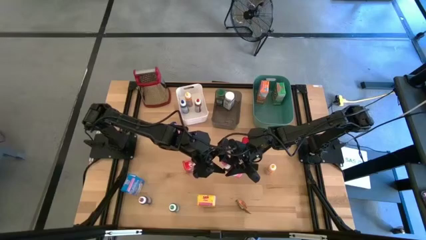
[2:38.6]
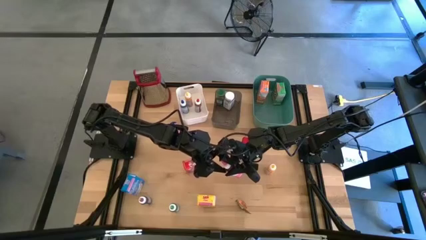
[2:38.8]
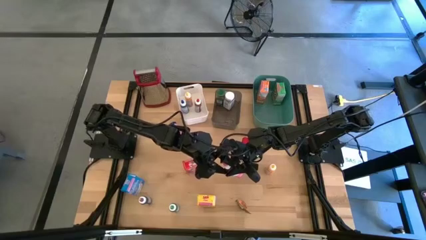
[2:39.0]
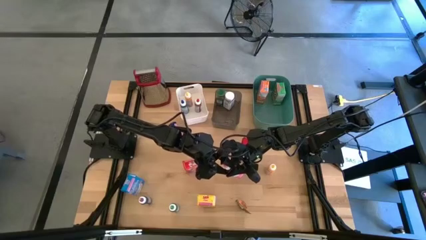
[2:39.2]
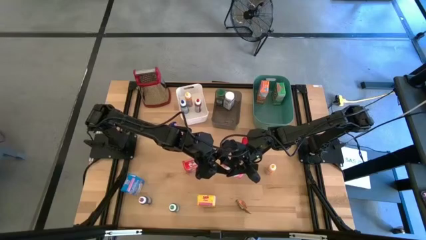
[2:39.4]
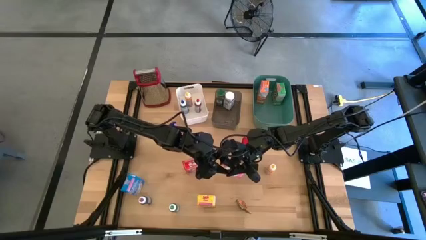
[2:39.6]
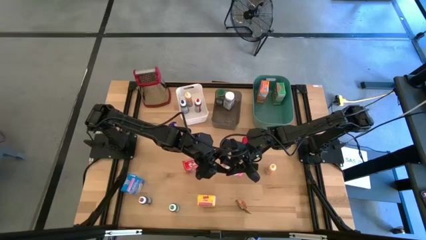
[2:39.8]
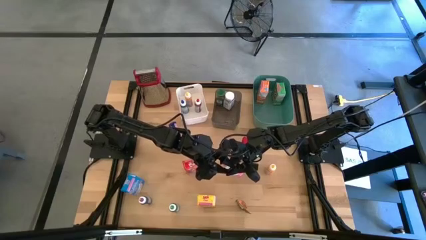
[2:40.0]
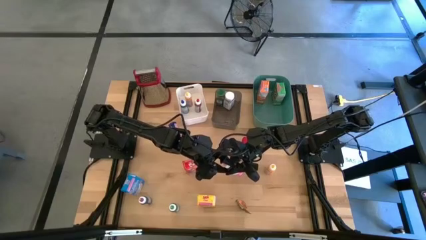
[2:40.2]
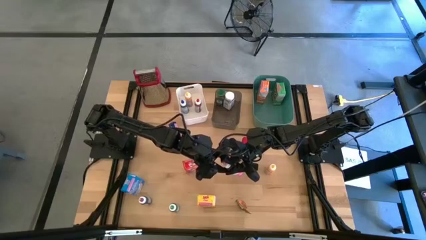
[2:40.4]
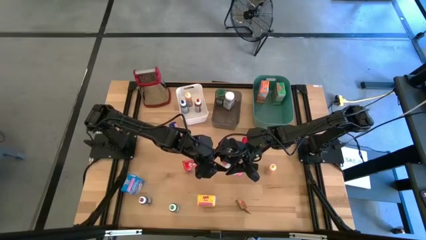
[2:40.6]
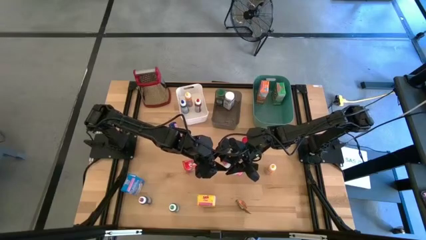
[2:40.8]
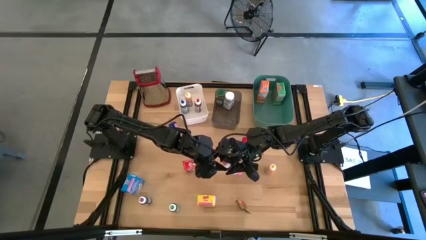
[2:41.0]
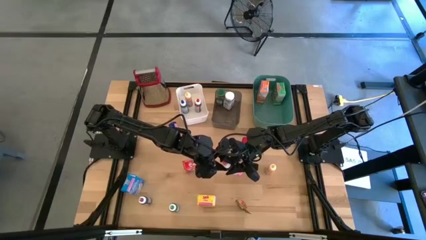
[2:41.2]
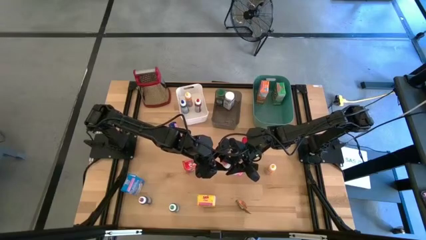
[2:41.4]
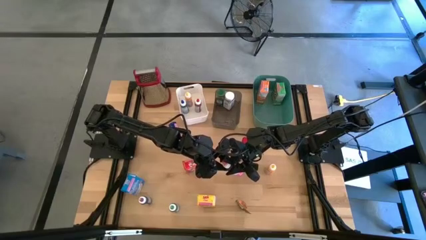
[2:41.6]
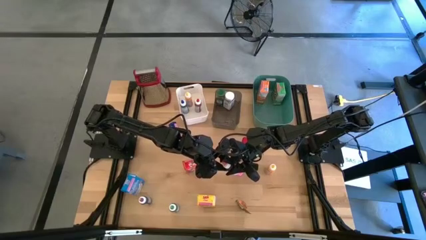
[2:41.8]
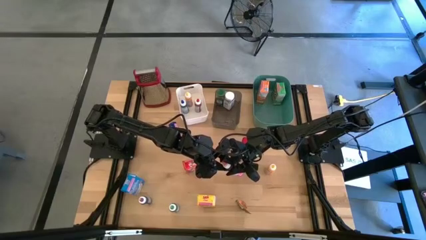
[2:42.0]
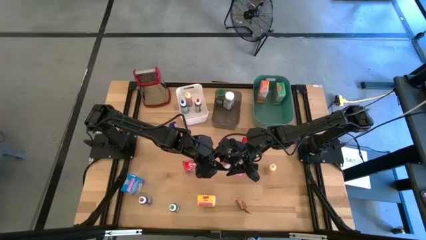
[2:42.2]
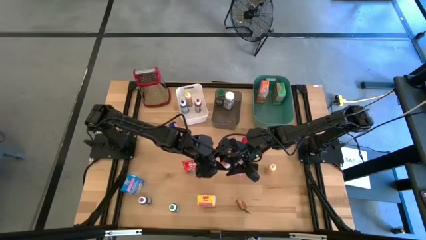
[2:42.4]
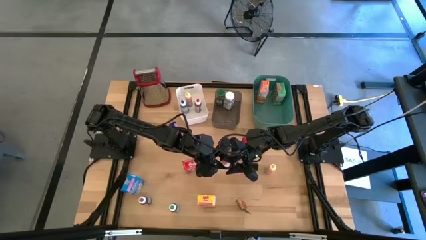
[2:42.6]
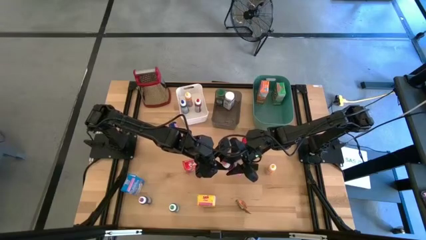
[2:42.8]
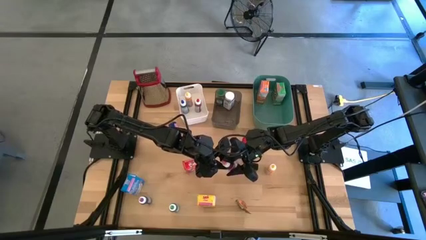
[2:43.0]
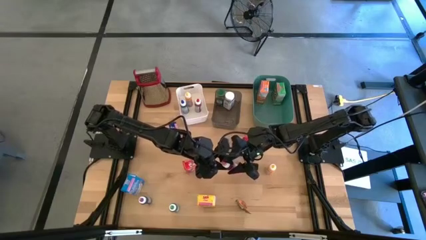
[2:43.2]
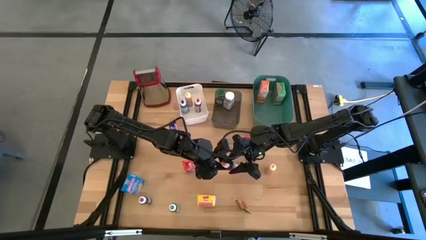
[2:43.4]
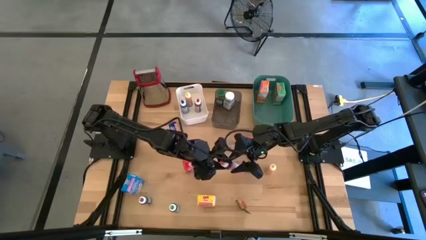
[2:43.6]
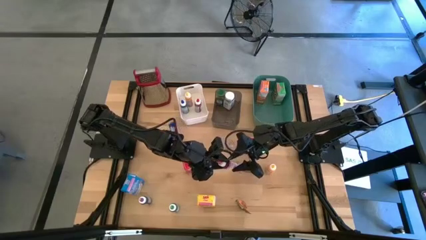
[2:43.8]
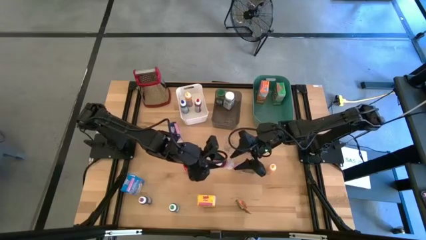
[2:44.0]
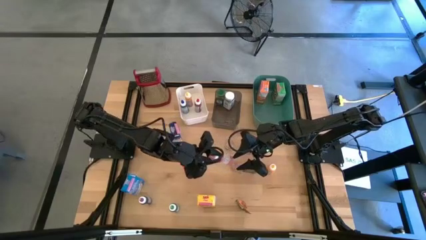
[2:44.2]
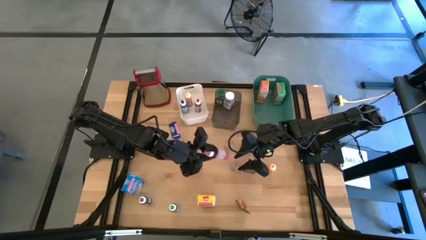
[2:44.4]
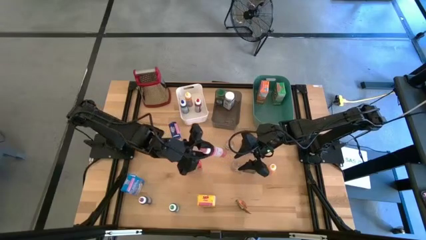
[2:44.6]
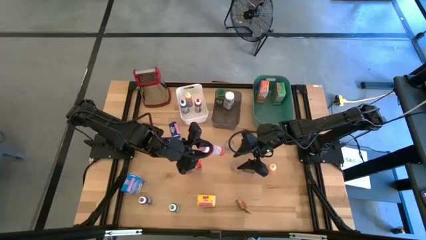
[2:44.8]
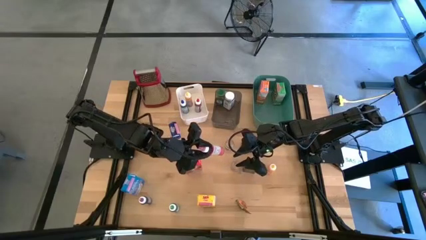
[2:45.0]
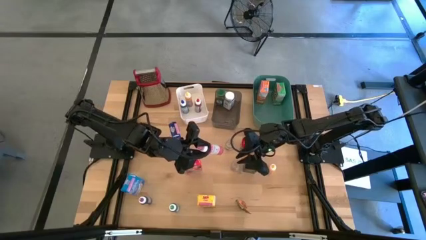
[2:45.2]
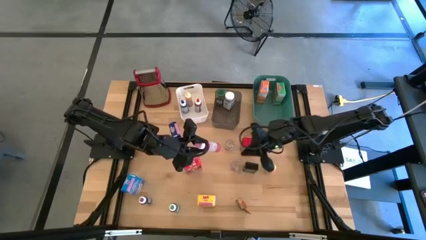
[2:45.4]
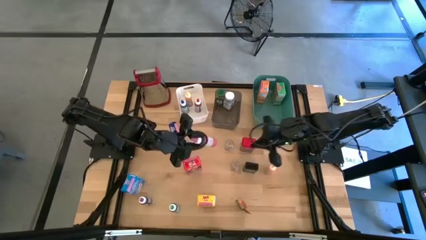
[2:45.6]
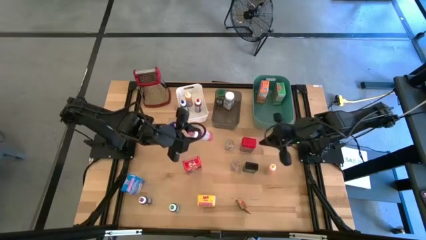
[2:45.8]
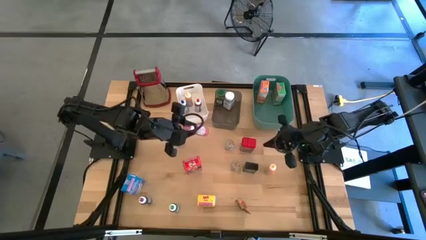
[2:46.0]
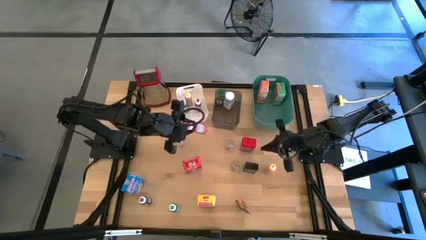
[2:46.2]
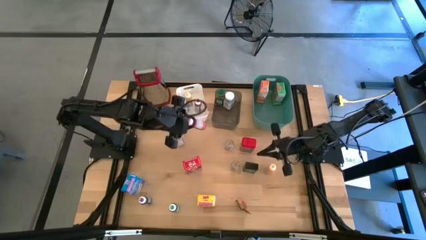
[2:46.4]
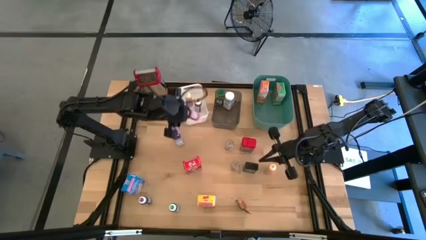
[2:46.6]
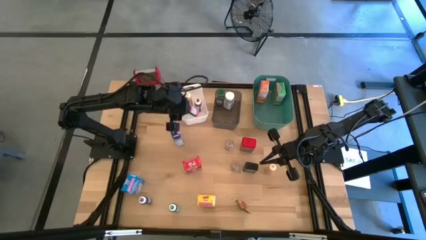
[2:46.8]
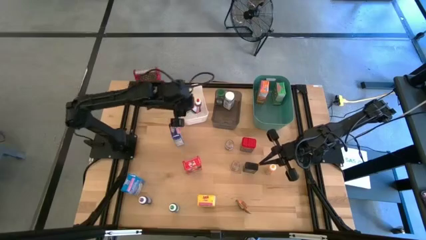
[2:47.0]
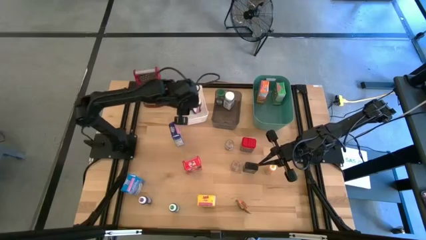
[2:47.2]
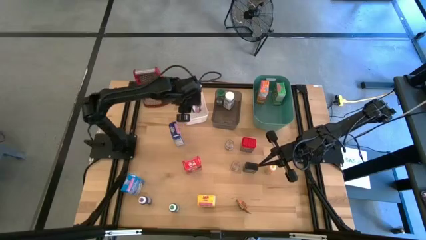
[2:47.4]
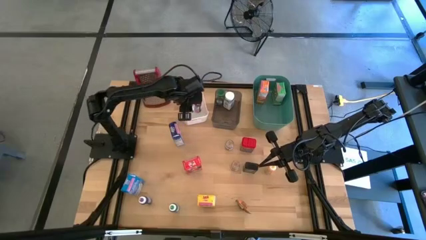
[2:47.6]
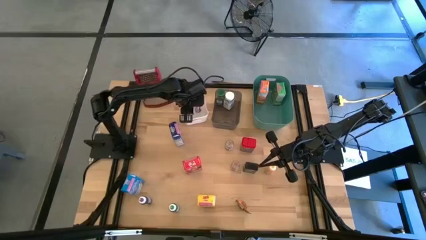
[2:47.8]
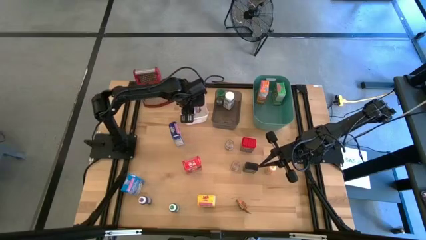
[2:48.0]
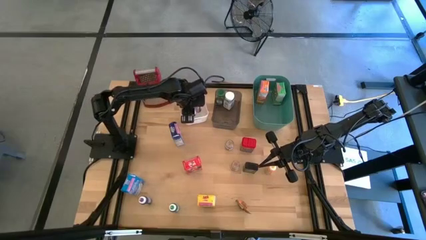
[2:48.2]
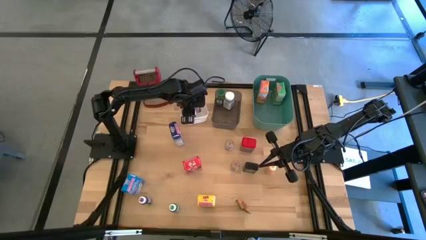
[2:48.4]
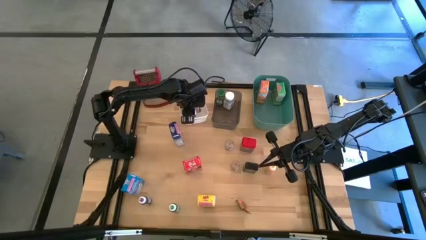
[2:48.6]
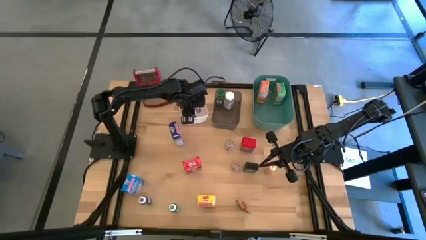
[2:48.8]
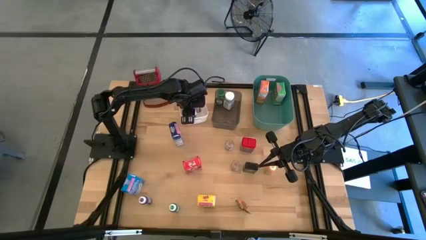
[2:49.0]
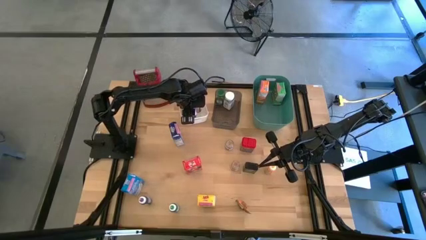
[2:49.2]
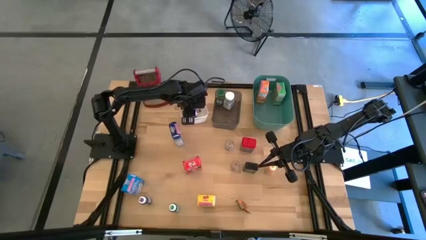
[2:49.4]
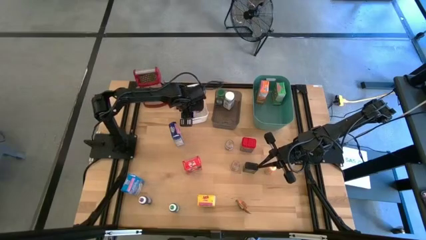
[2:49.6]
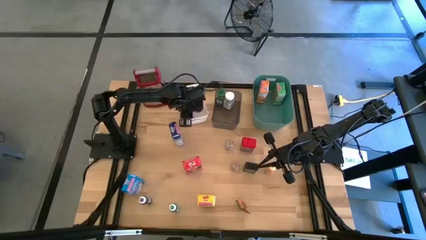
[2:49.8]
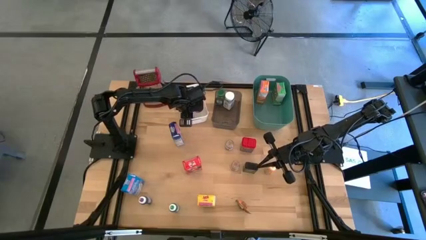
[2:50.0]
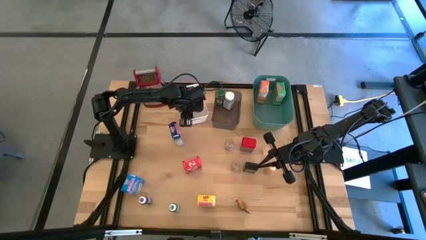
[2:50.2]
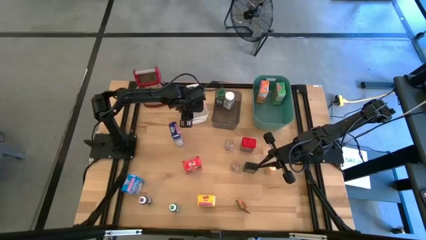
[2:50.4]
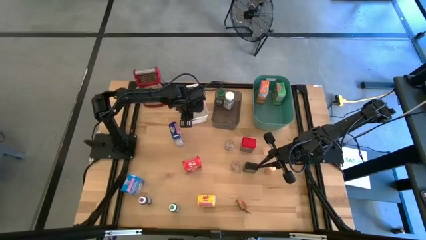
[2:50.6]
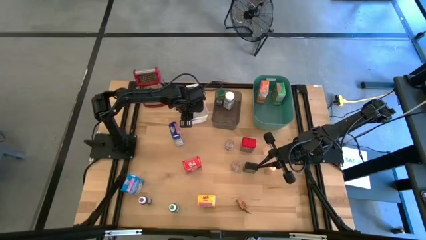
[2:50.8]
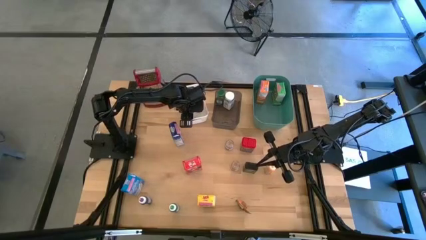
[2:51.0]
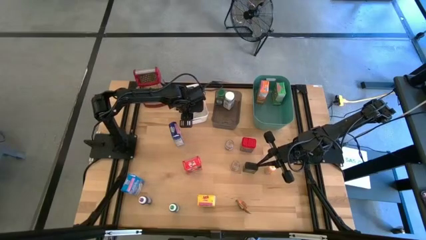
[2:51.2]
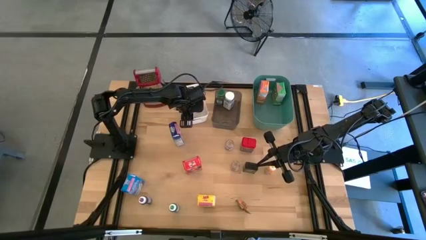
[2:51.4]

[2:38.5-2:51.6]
Task: Pick & Place Kitchen Items
Put the pink food coloring into the white bin

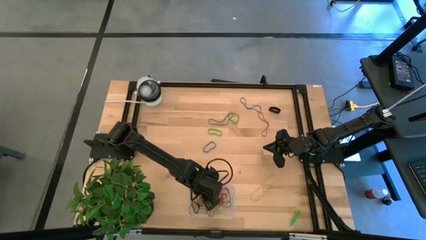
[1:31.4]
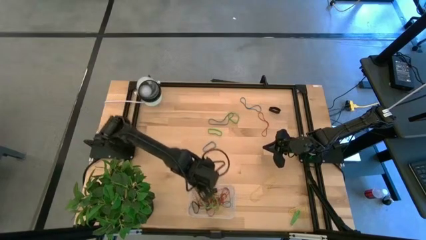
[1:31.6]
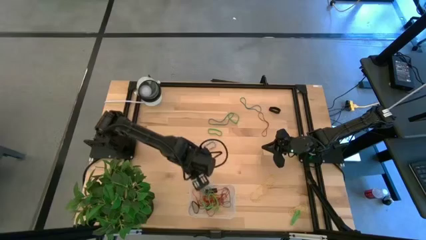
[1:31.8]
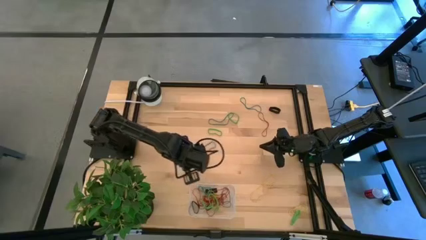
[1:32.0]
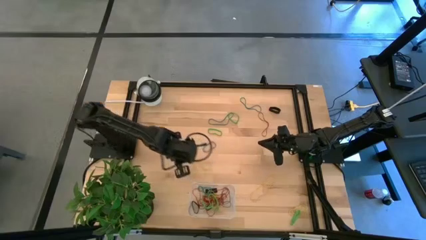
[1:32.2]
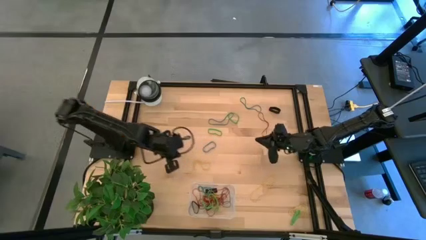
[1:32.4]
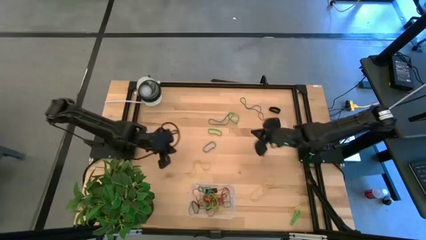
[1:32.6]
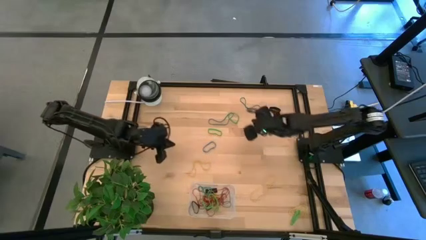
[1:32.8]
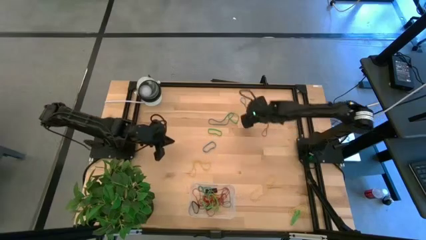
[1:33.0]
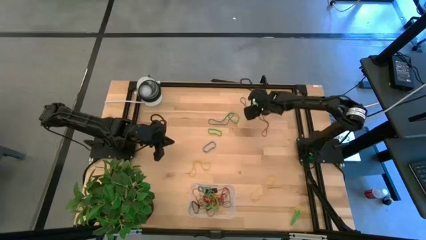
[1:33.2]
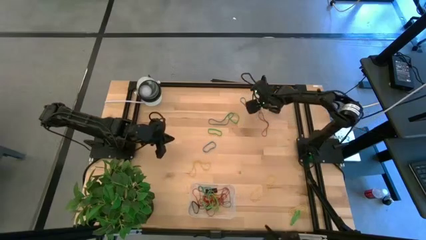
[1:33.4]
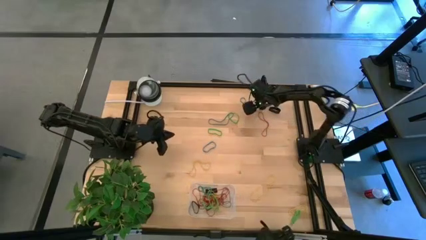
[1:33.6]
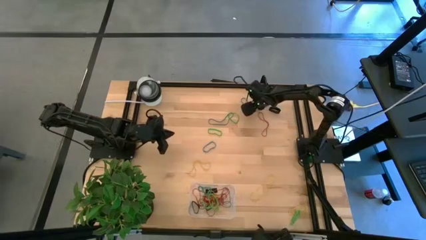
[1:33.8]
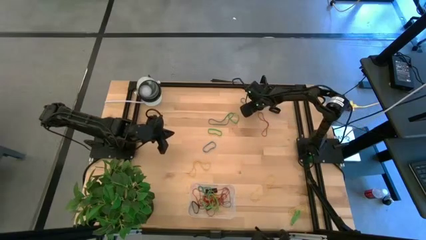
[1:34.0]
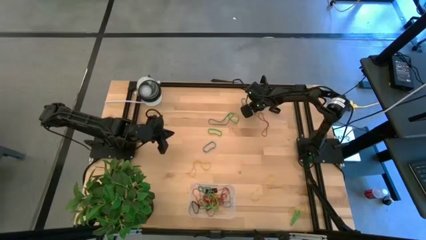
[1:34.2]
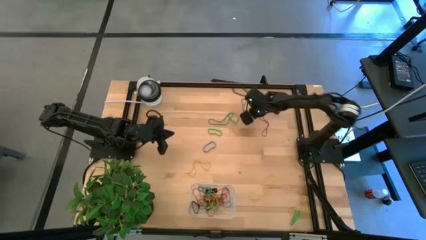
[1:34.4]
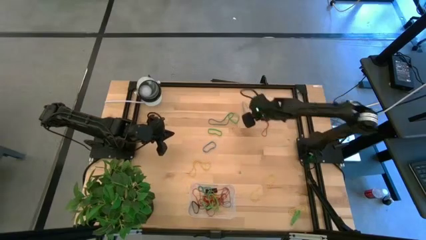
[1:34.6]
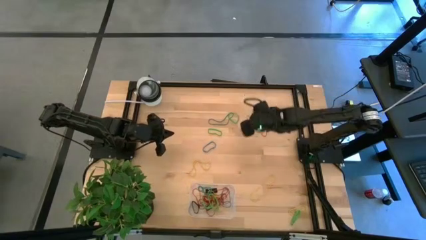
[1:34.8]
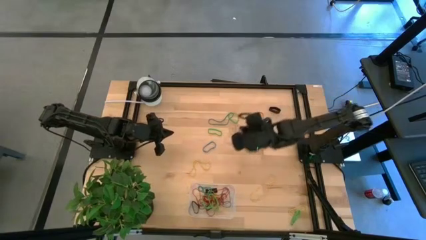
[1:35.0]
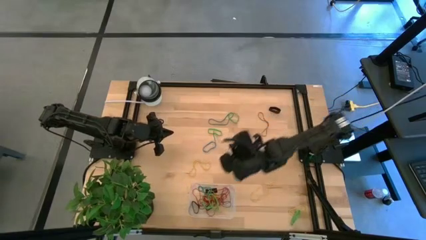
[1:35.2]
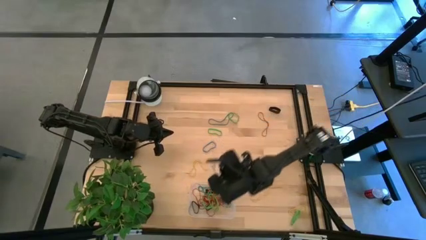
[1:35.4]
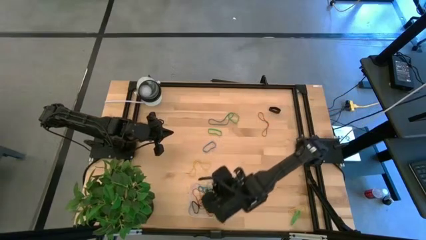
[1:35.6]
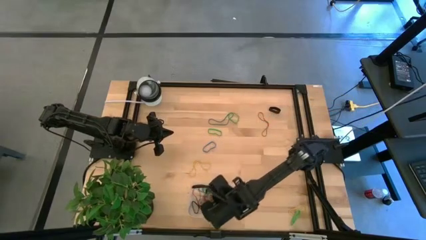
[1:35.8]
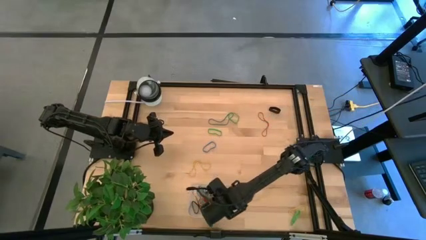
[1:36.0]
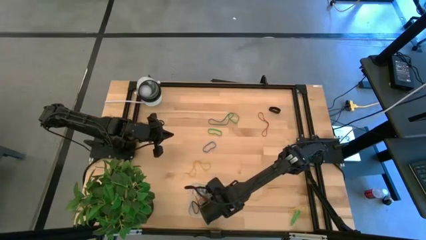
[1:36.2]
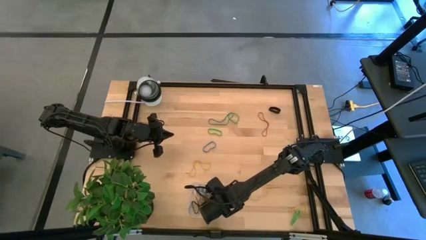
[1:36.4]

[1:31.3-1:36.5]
Task: Pick and place rubber bands into bin
Put the blue rubber band into the transparent bin
